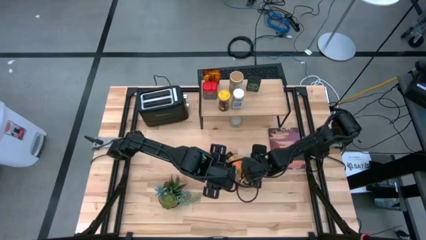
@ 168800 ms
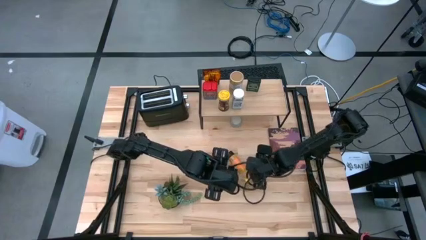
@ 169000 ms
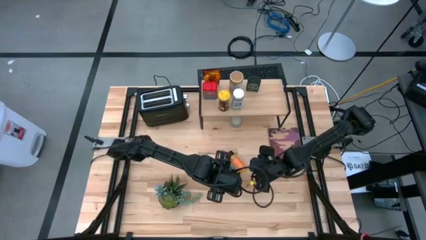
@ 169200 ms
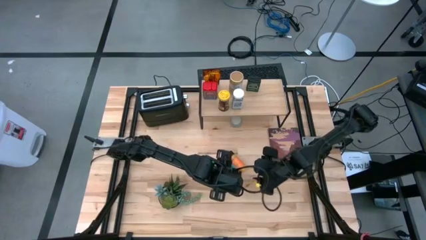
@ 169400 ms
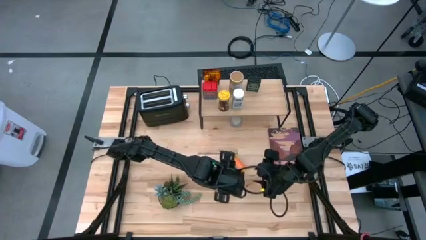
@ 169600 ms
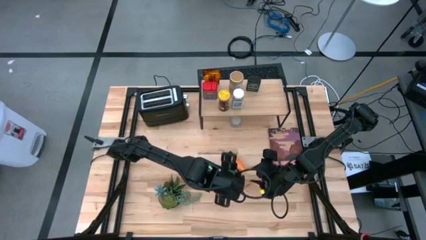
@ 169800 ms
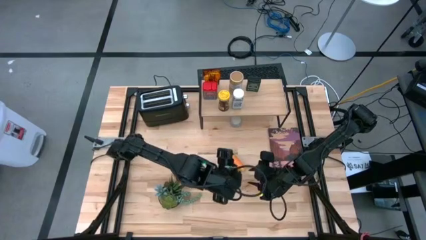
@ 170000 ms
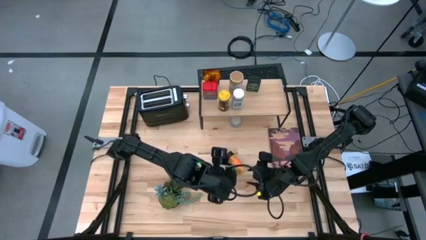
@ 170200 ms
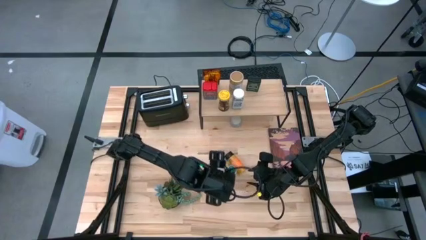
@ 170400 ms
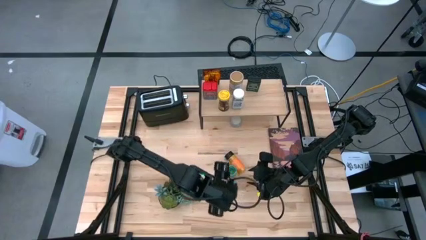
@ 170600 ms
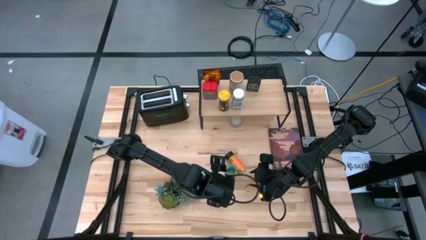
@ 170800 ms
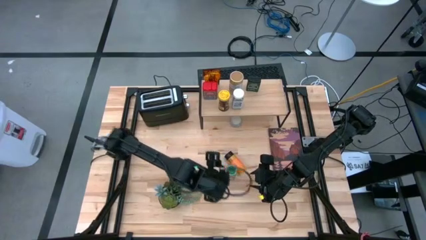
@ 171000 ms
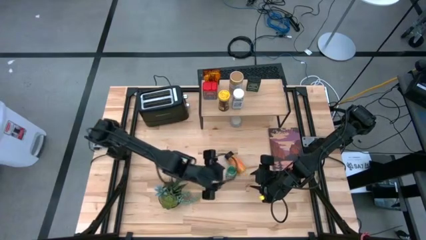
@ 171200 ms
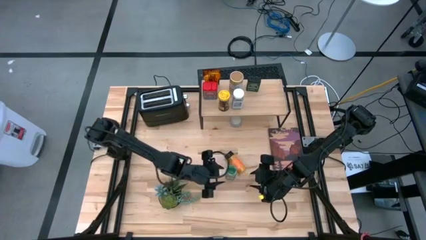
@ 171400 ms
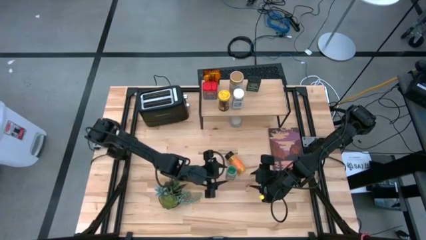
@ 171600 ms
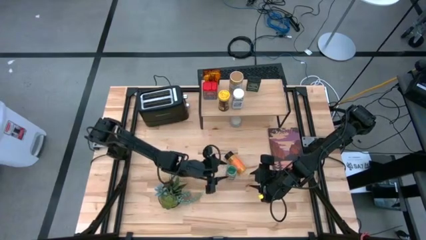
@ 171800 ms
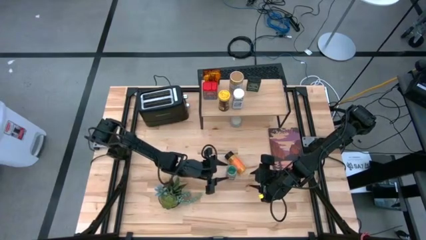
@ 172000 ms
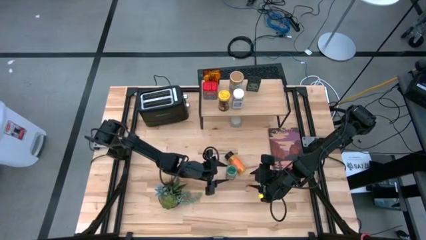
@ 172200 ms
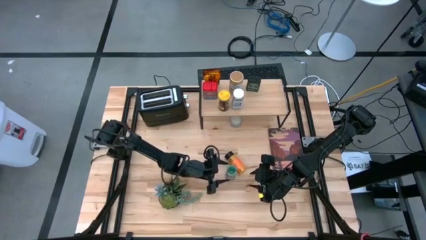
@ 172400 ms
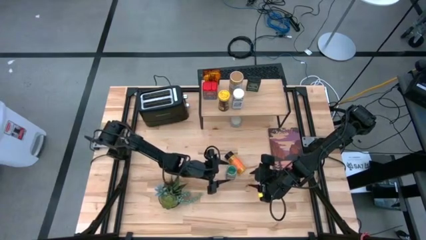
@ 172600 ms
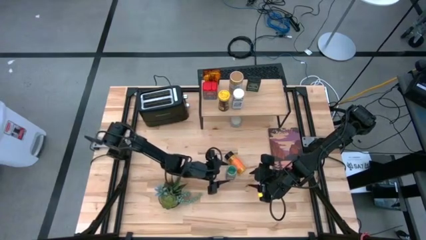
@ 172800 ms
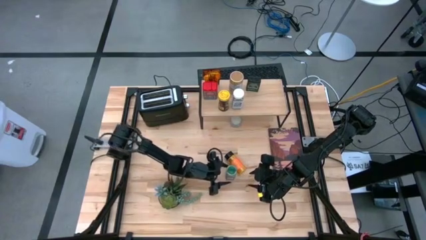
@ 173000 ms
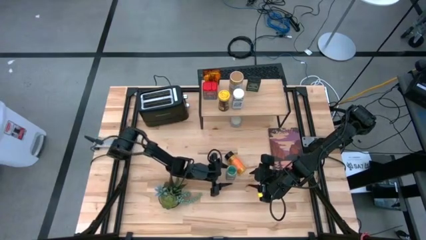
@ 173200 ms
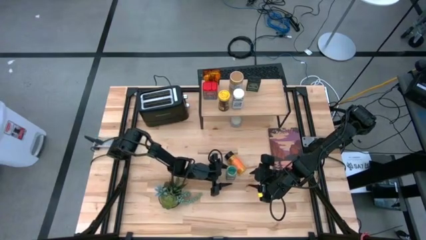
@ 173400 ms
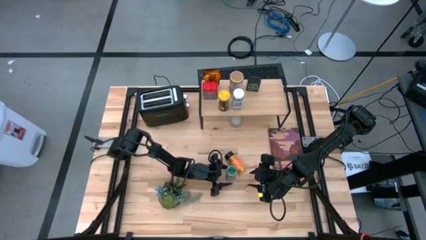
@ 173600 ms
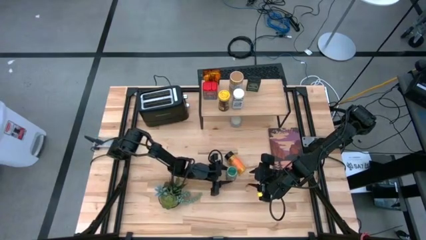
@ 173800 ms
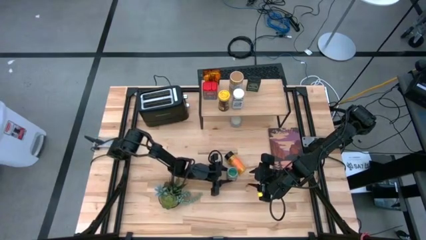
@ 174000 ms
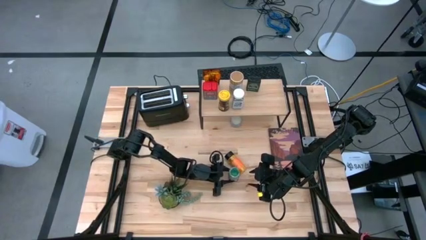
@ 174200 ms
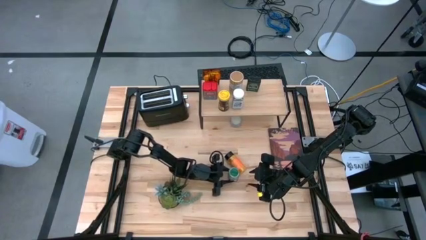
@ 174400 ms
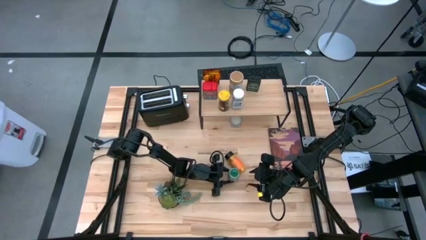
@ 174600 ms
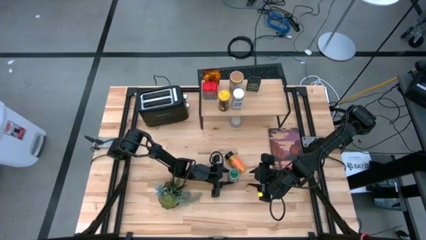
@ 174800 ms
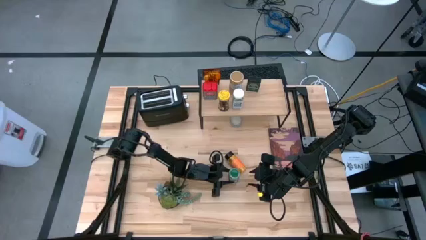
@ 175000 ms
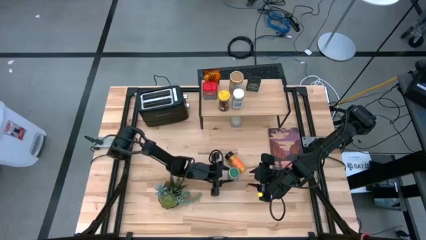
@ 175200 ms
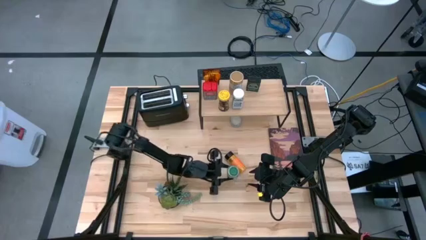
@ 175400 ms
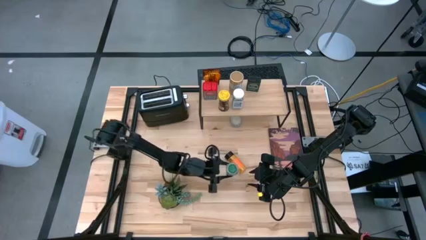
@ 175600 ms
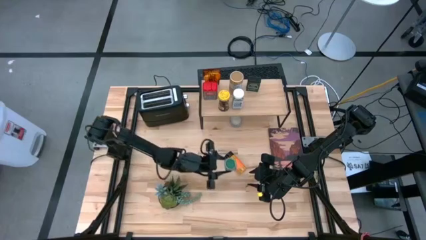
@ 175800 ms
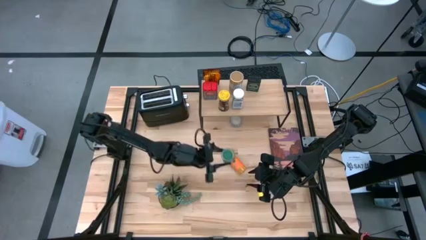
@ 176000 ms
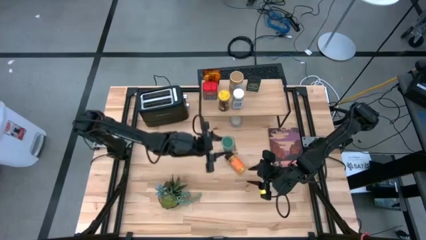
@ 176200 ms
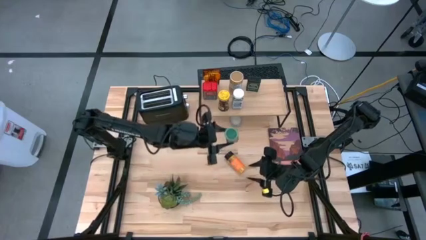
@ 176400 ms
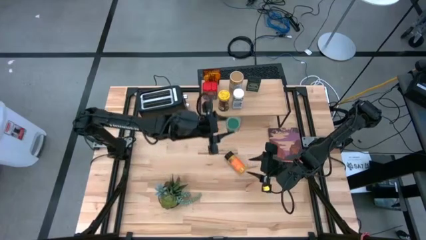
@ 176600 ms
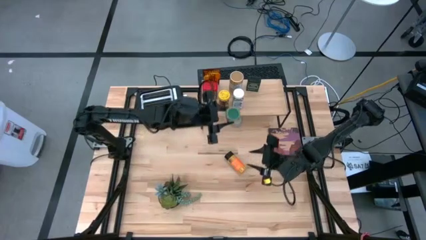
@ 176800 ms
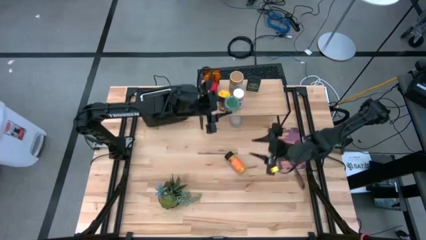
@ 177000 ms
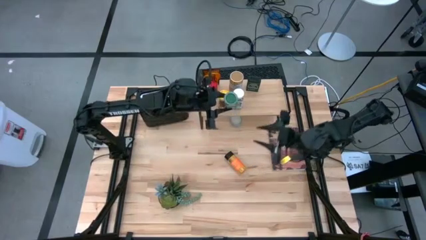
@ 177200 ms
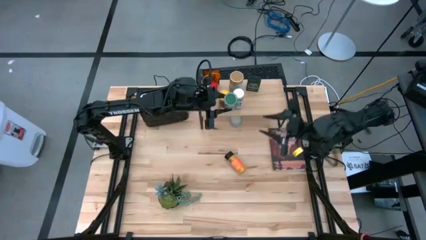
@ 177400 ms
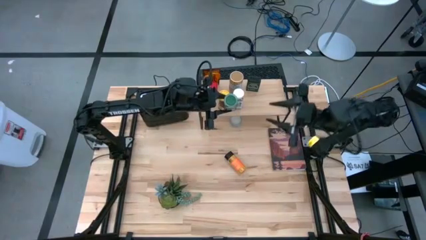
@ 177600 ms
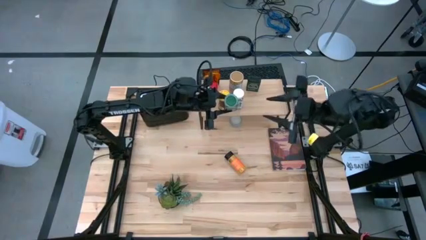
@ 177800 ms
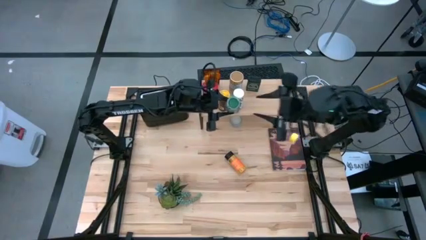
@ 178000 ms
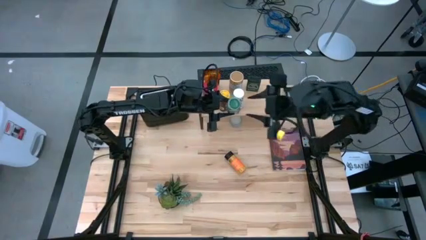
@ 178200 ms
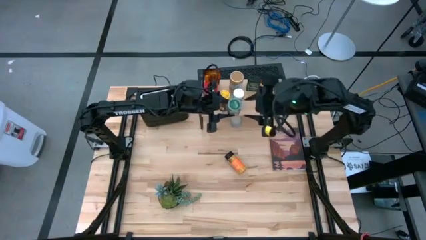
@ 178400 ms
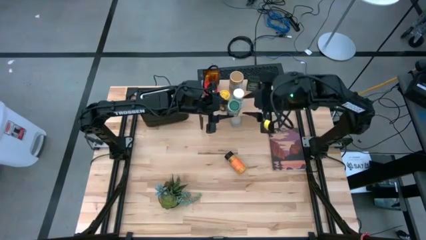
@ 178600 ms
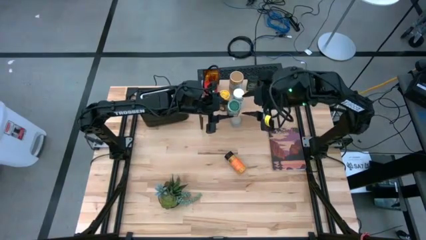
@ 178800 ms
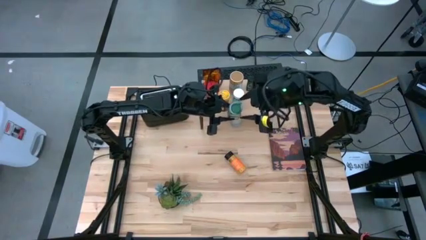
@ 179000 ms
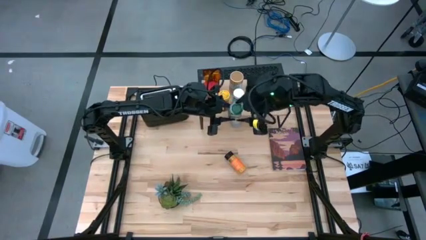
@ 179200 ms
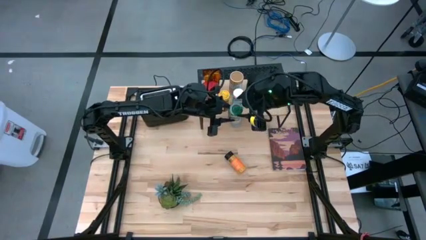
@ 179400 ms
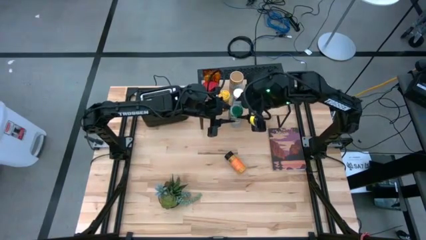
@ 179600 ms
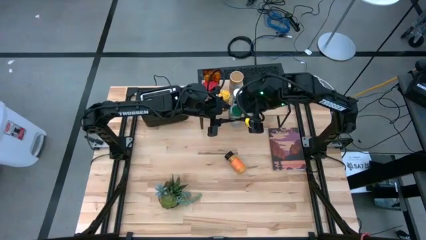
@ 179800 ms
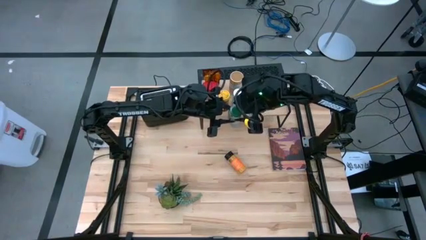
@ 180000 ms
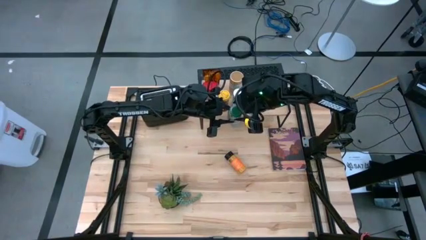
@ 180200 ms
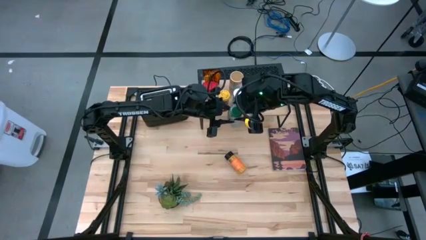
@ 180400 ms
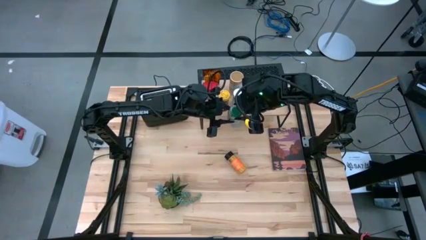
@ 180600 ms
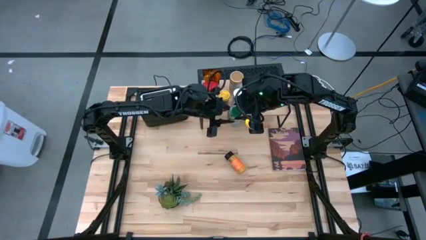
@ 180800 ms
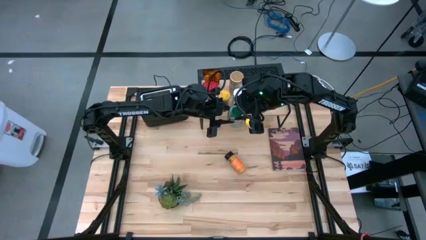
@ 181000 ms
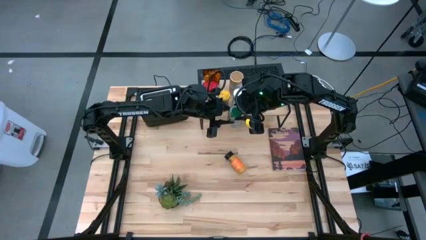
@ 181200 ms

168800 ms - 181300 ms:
Task: Shelf spices
Put the green seasoning bottle on the shelf

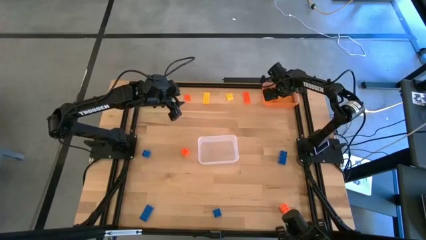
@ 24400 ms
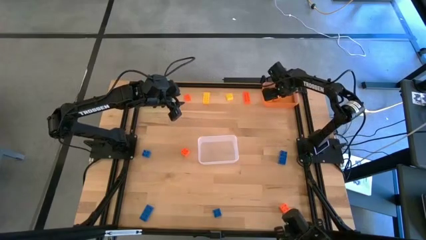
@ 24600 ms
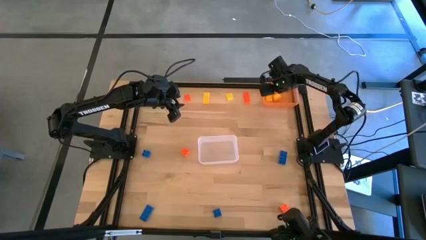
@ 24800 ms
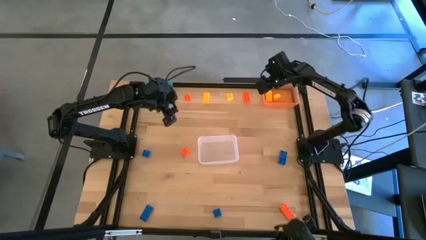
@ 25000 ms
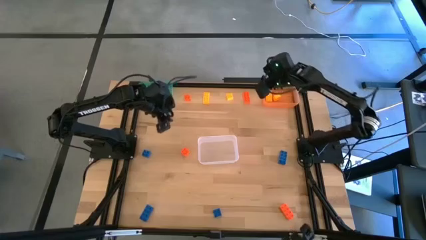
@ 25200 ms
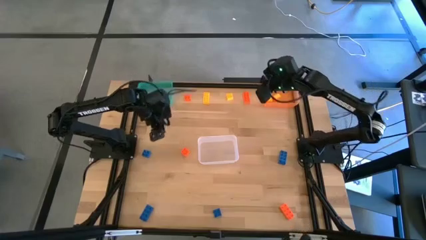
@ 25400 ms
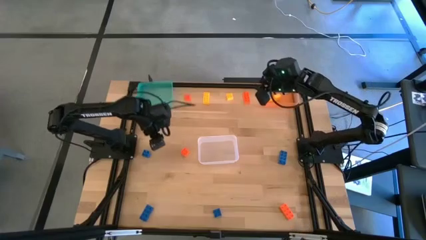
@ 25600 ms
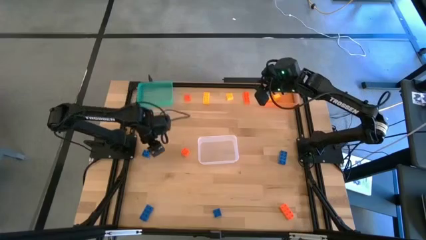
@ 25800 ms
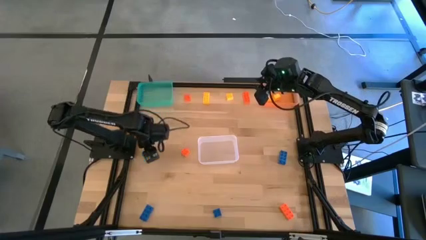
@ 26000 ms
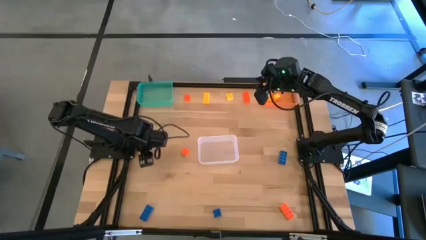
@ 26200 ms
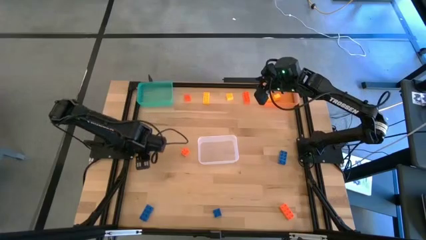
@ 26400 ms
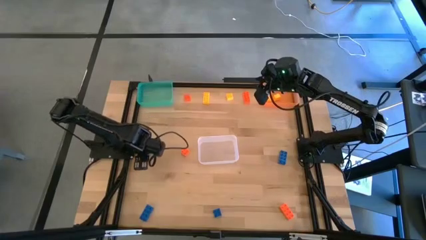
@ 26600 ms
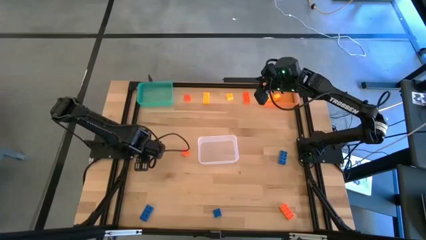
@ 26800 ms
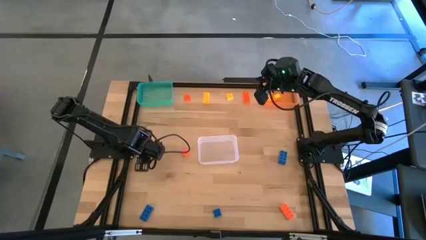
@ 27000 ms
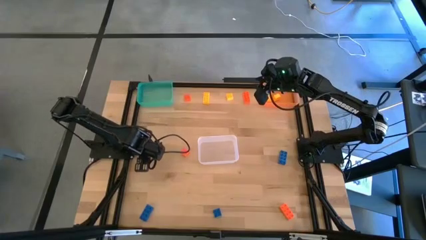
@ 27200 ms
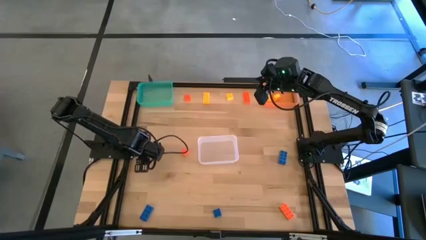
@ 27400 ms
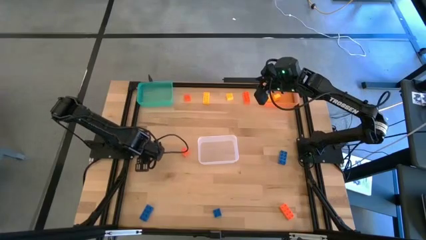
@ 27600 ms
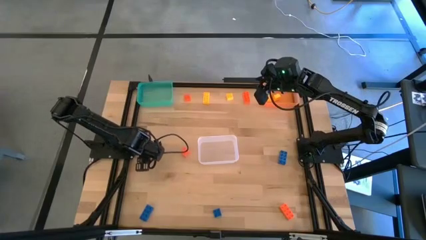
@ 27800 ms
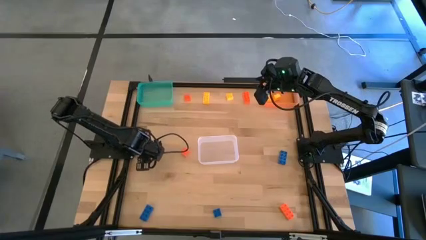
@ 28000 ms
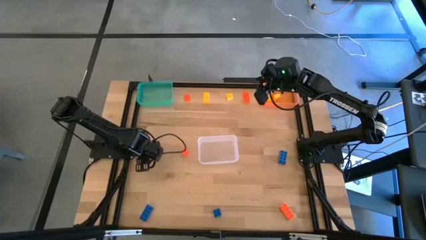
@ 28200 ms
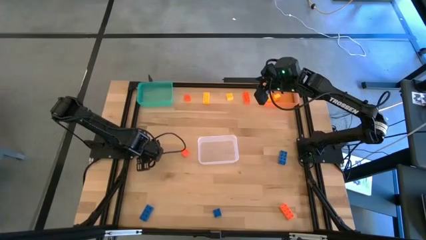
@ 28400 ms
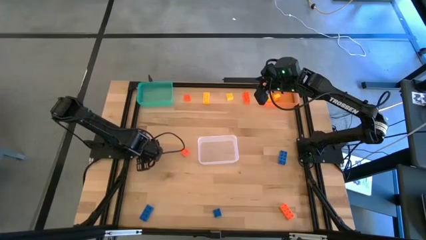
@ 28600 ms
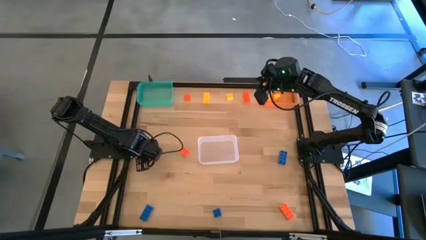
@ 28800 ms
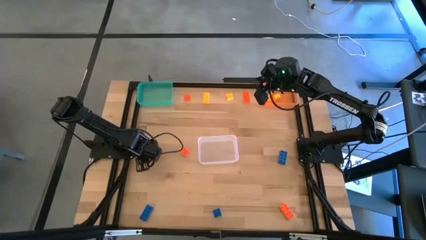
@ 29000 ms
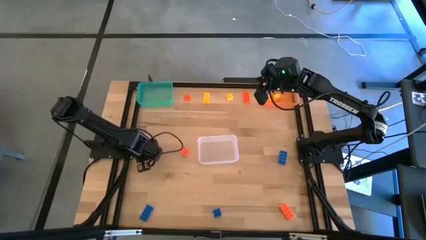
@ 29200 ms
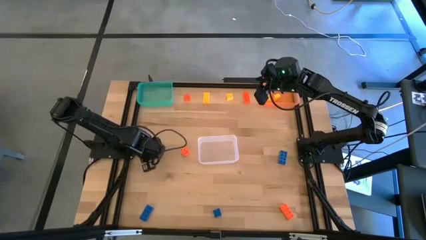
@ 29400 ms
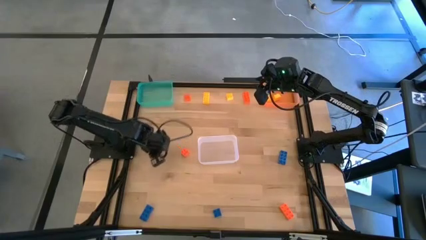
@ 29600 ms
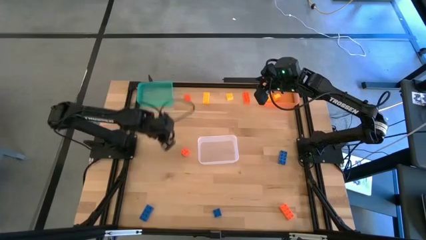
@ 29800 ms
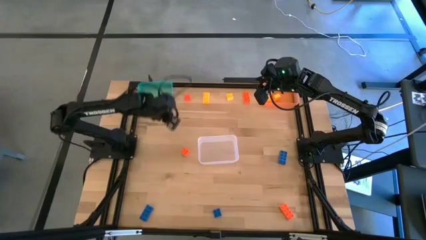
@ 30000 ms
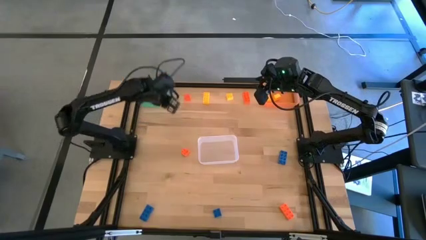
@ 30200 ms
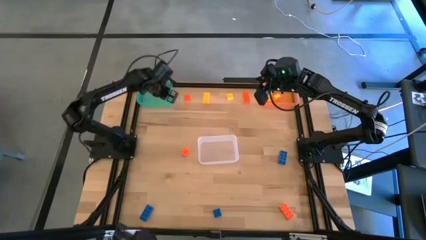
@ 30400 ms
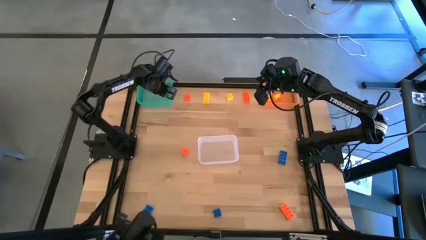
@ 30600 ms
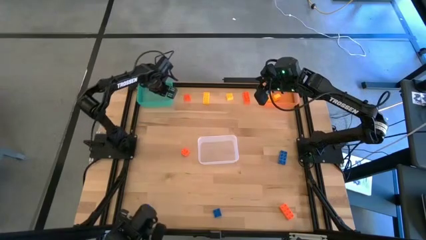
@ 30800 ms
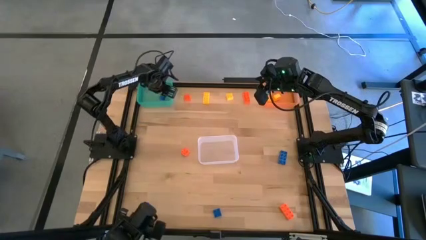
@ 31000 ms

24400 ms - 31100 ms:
Task: Sort & place blocks by color
Put the top left blue game piece into the blue bin
